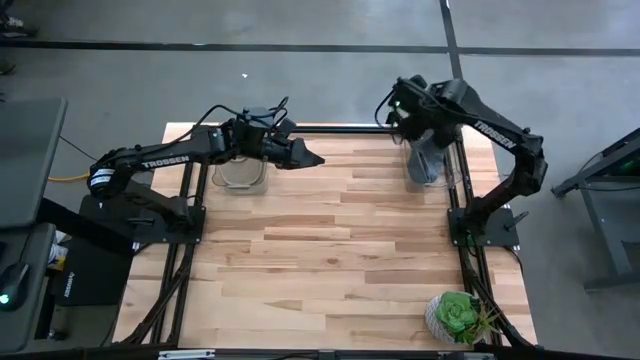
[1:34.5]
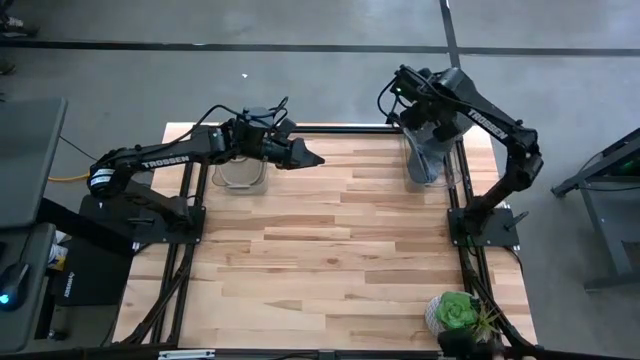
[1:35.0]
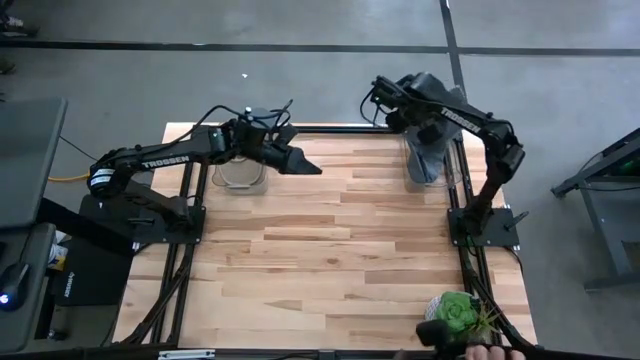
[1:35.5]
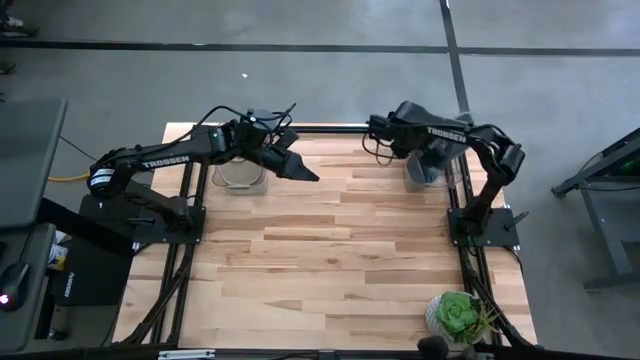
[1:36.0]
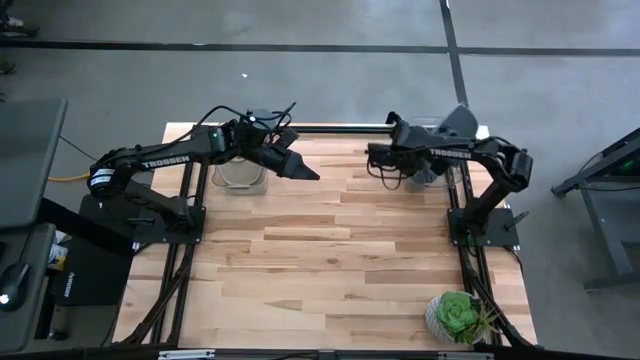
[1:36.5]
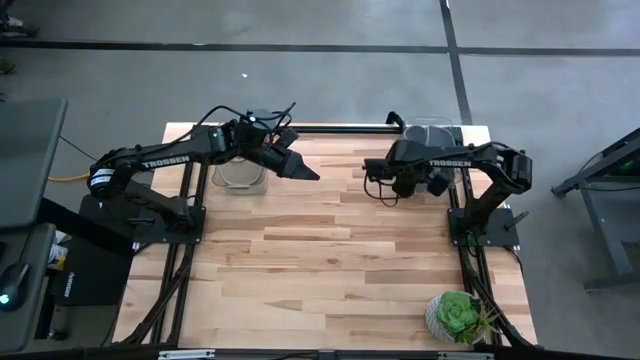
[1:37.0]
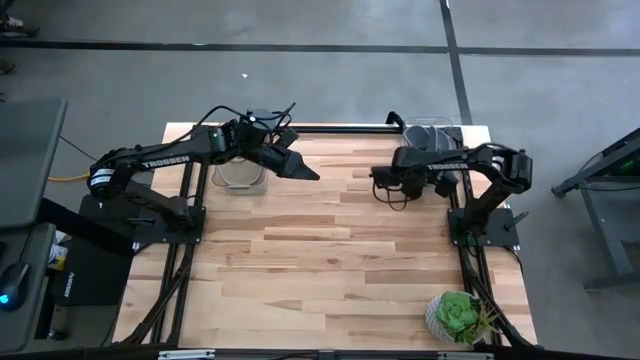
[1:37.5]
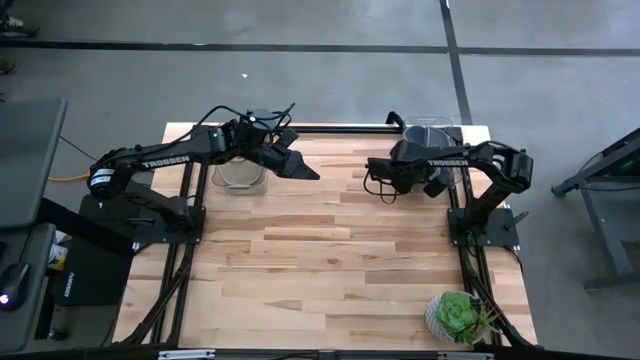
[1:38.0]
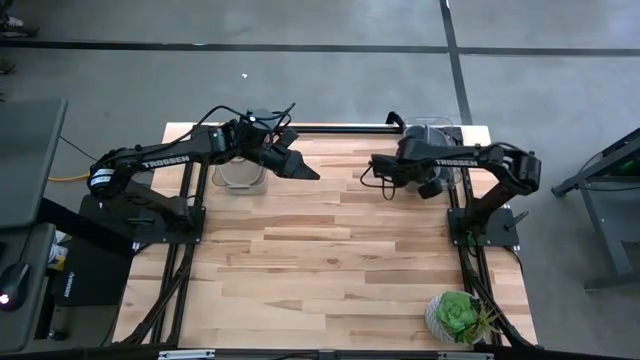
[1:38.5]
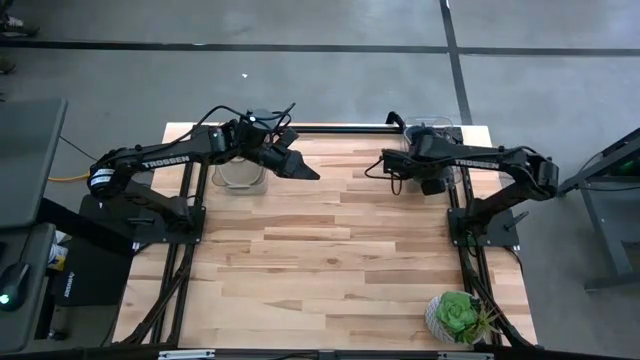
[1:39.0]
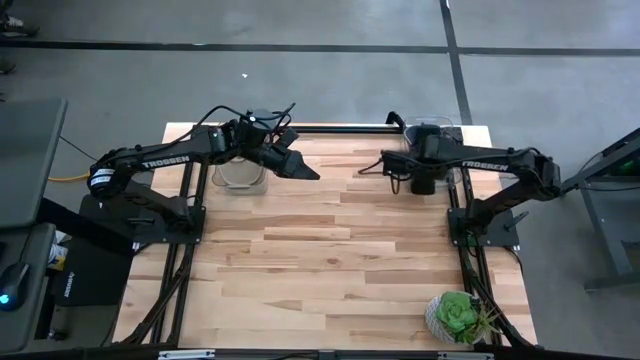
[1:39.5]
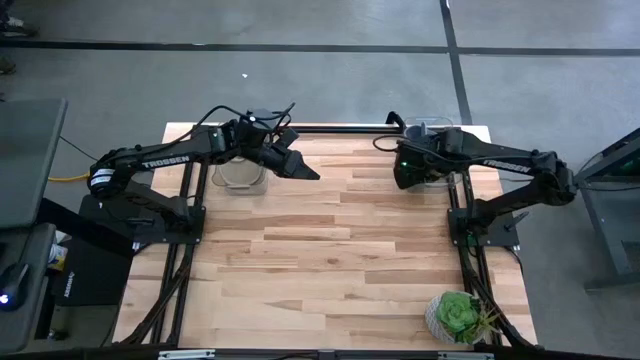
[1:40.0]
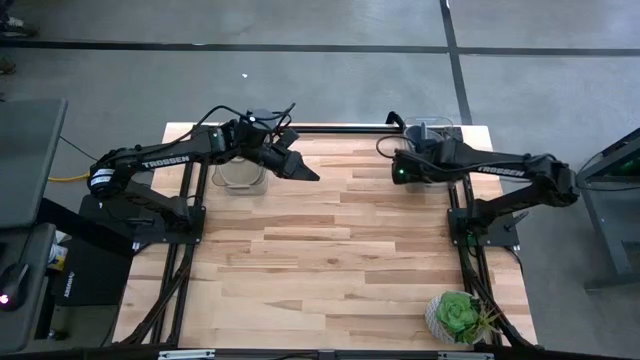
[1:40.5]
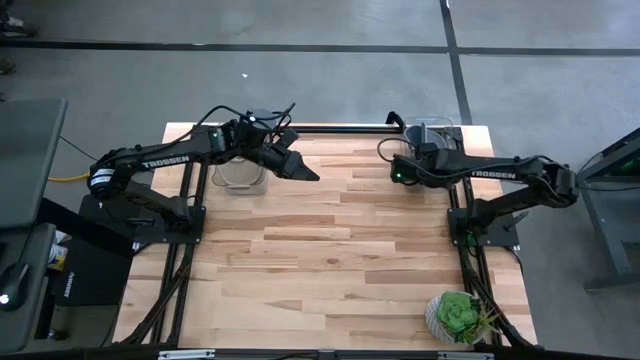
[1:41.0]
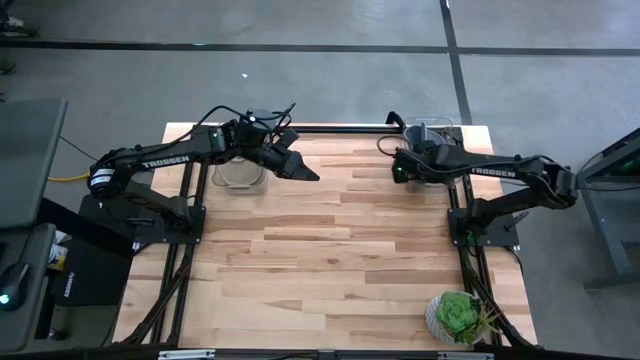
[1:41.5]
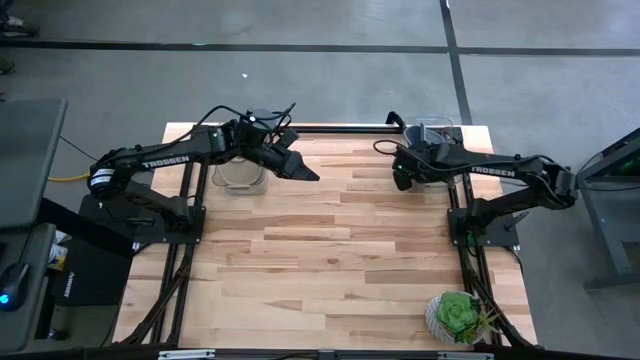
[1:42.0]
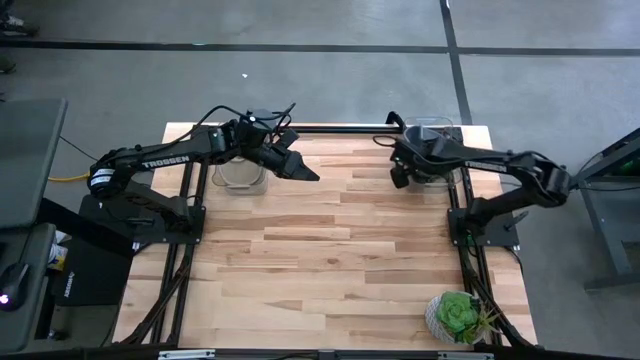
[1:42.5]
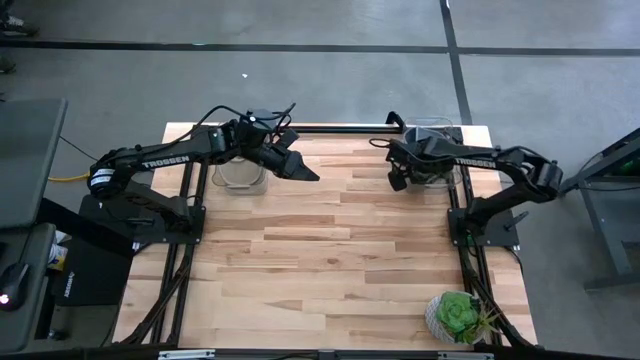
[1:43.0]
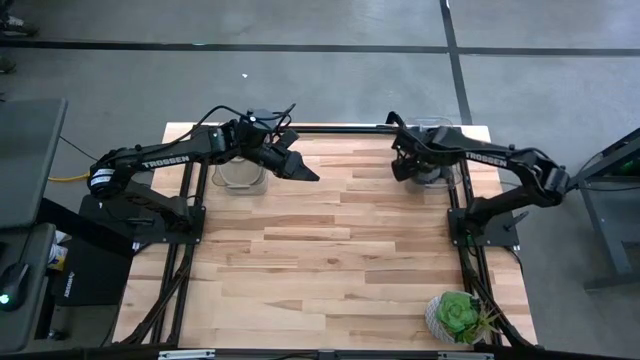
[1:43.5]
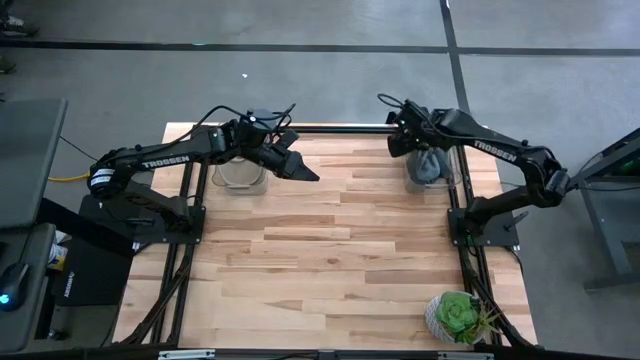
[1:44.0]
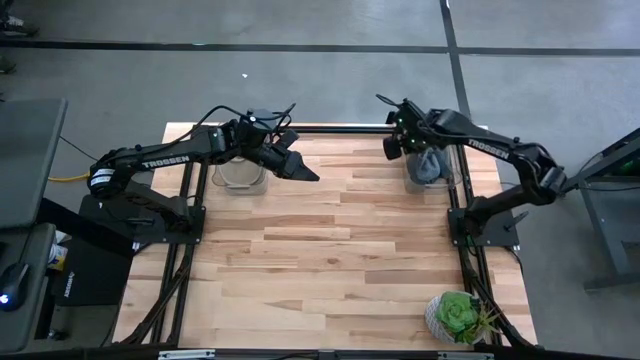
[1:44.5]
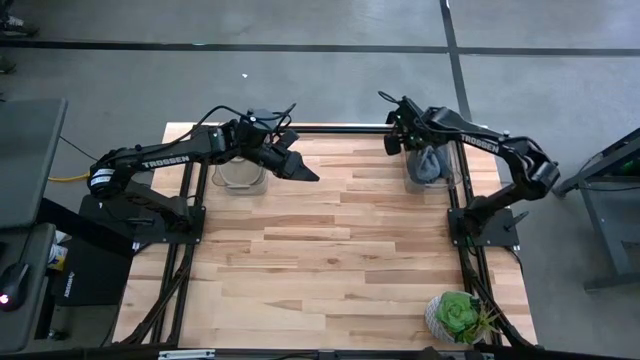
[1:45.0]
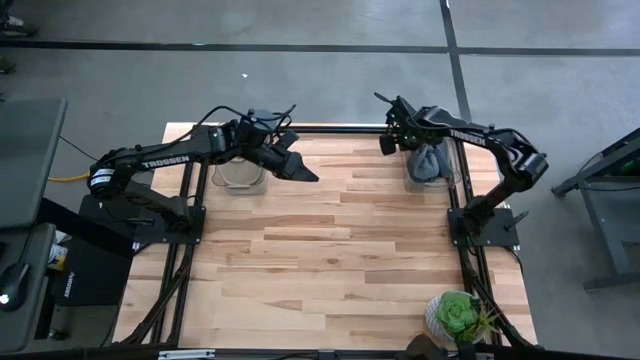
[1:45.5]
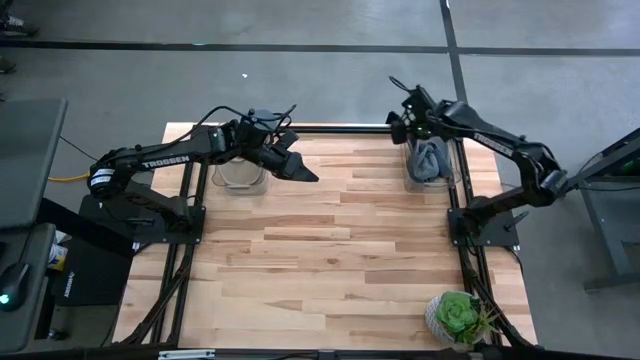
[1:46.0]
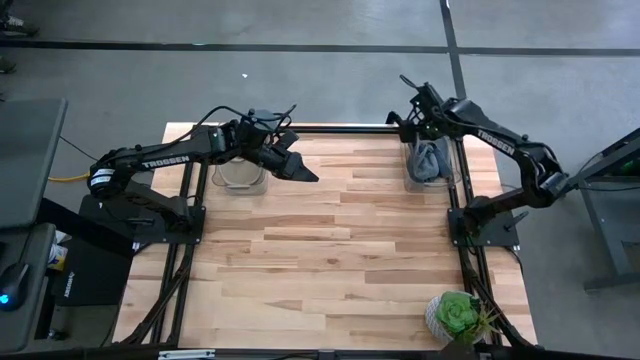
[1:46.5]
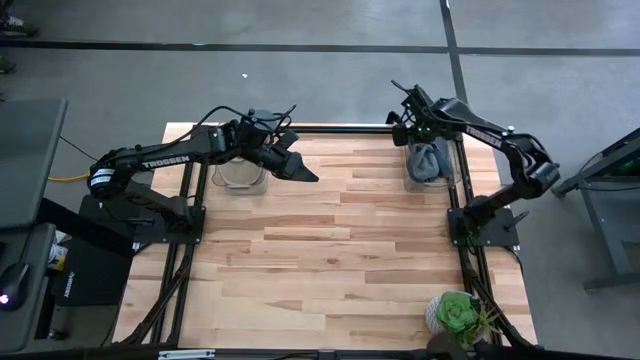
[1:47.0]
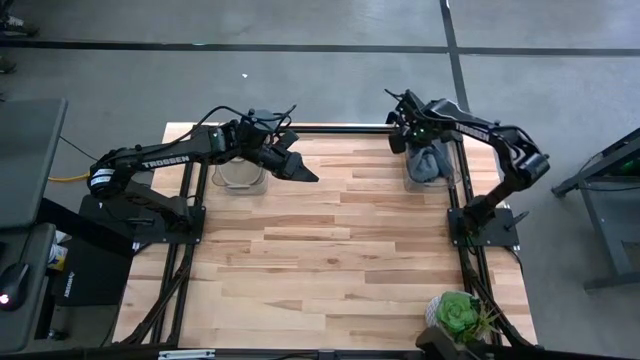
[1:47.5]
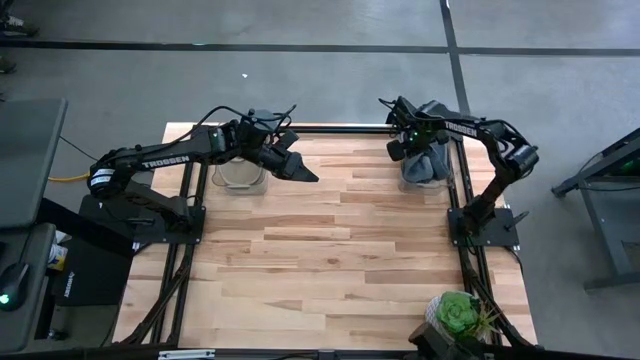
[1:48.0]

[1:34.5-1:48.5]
Task: Pick & Place hat
Put the blue cap into the right transparent bin

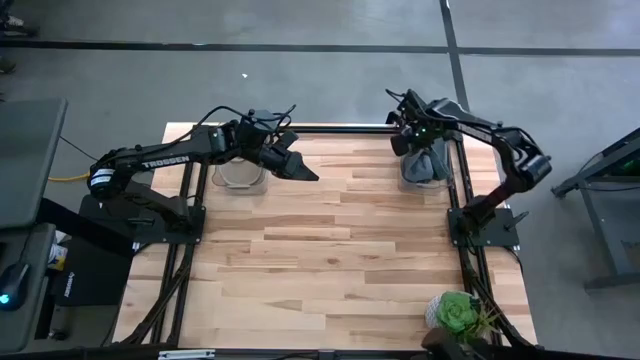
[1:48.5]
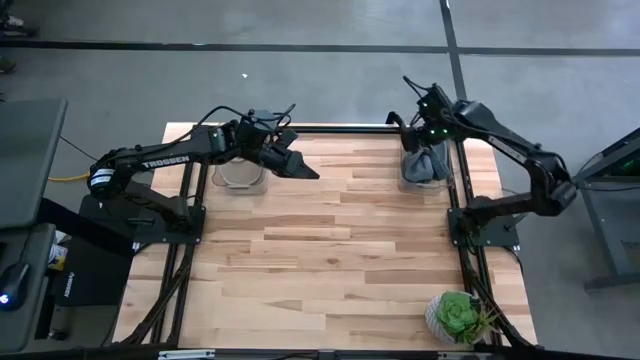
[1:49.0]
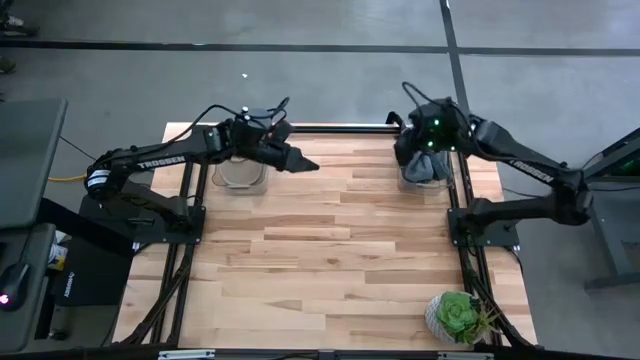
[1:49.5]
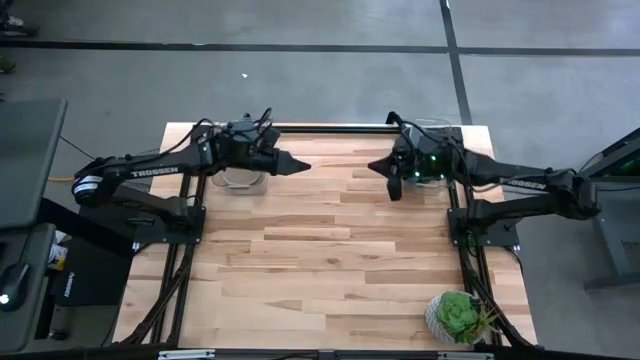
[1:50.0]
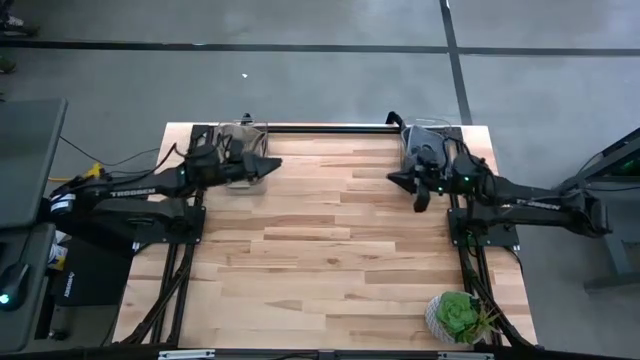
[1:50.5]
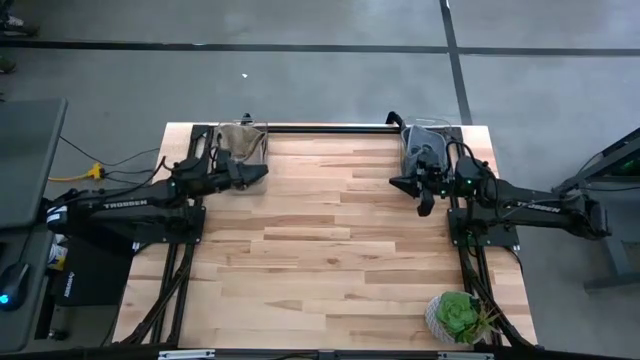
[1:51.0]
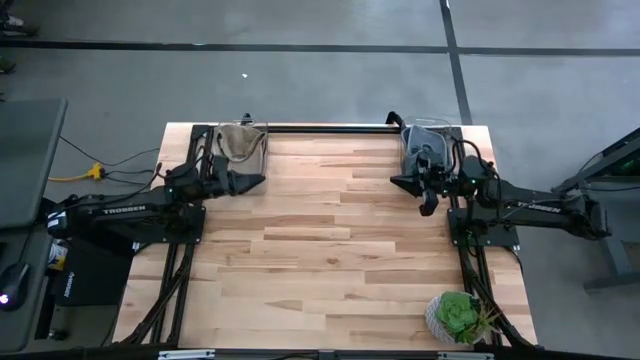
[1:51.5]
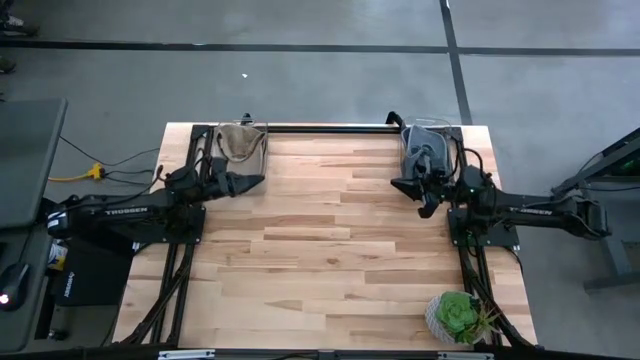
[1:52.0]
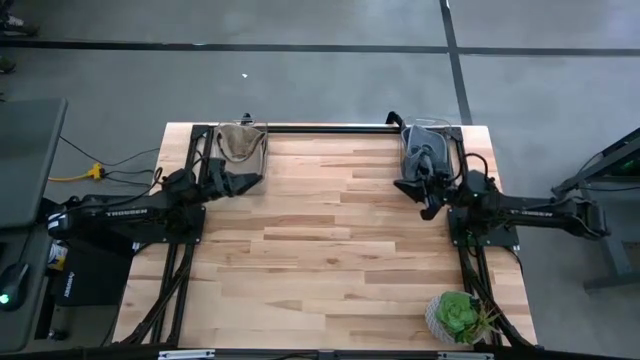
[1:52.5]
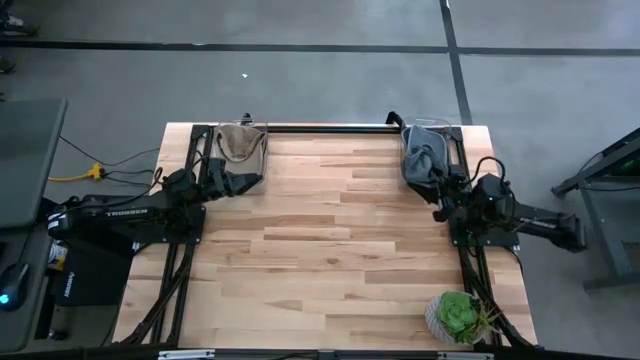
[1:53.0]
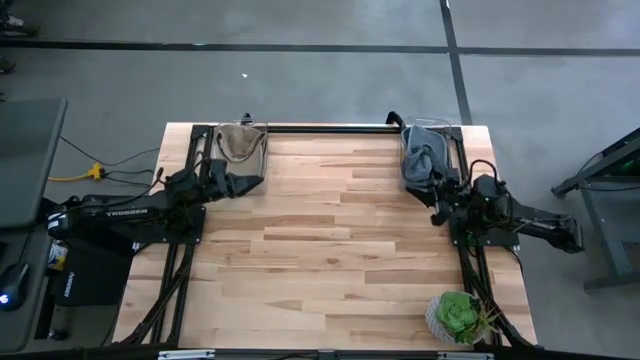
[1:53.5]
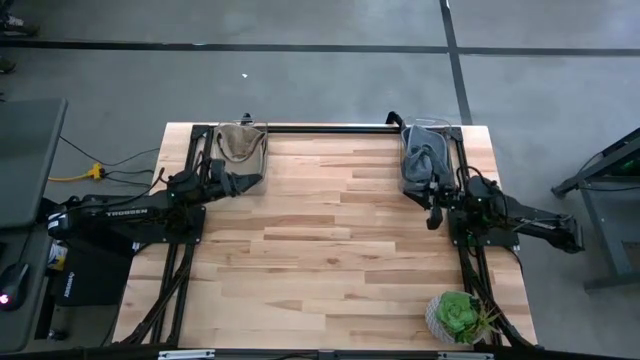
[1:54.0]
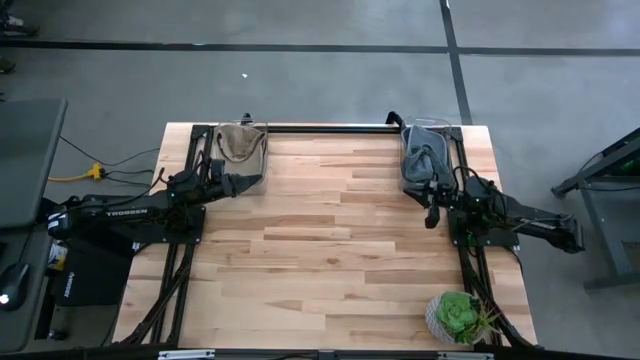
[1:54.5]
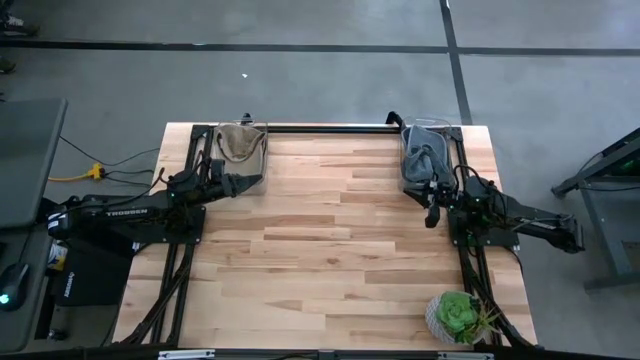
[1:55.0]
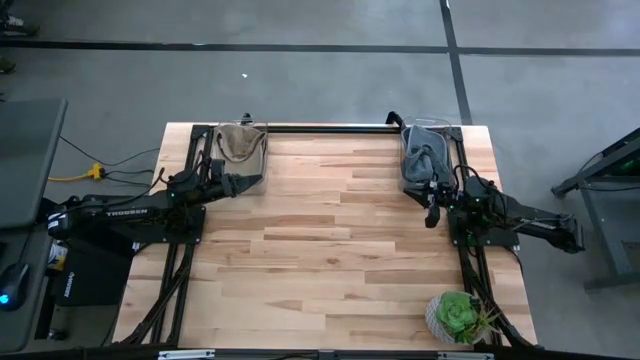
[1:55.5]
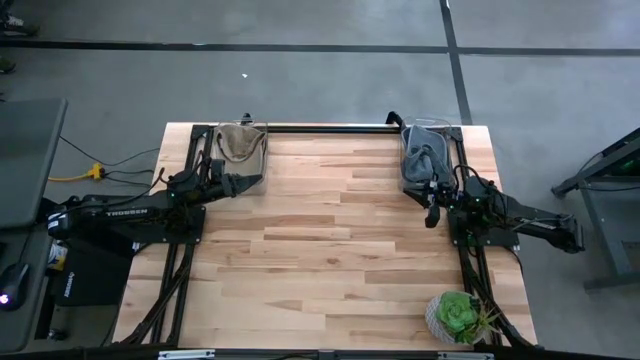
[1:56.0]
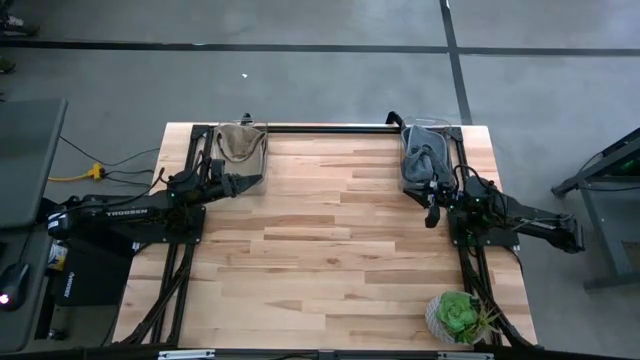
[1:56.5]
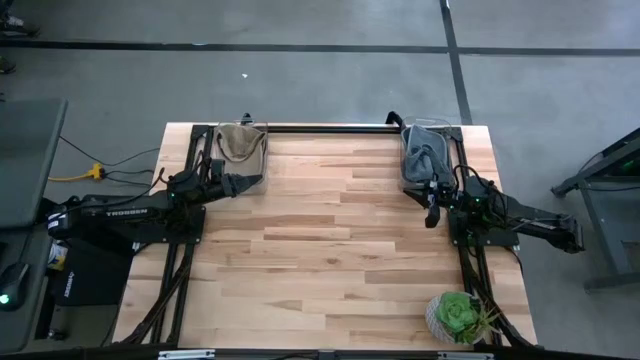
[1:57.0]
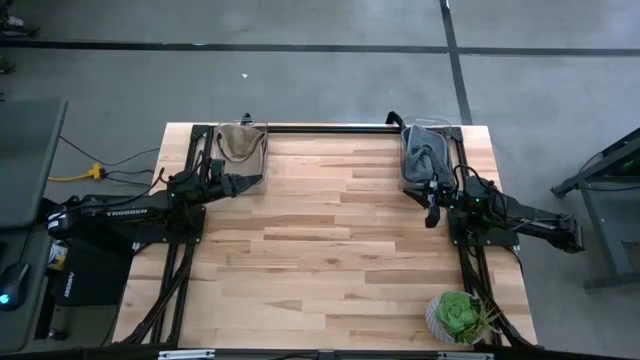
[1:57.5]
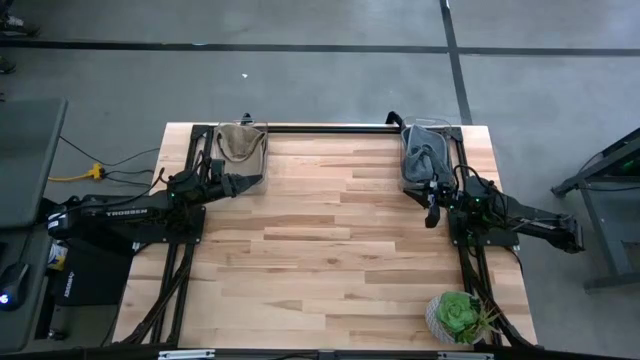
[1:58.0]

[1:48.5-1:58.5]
Return to Home Position
